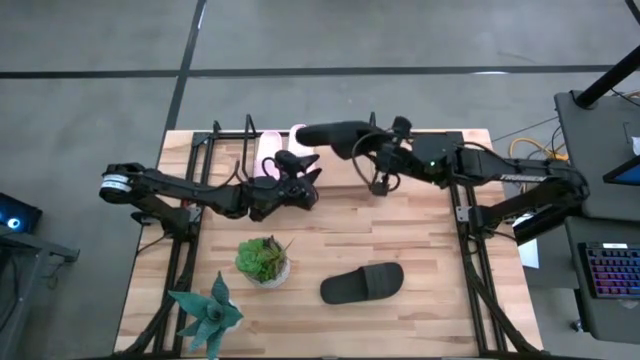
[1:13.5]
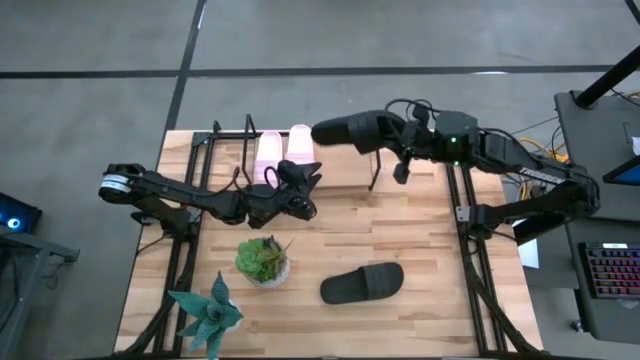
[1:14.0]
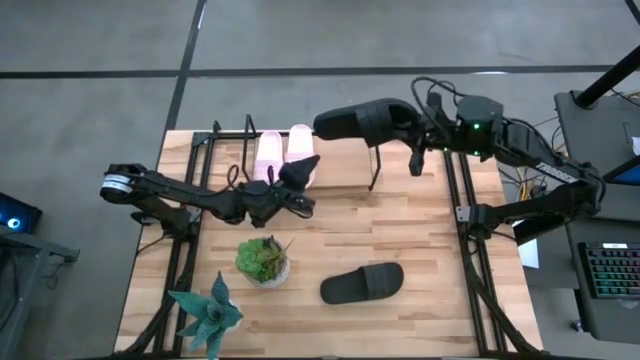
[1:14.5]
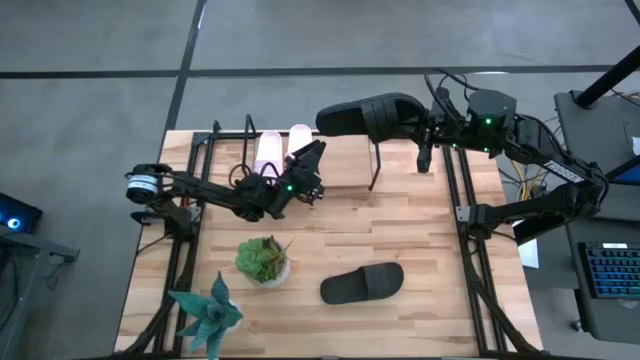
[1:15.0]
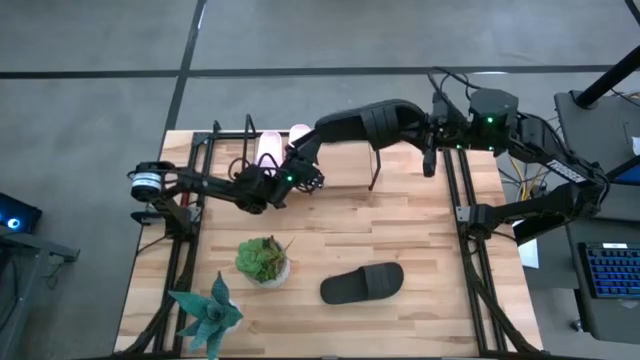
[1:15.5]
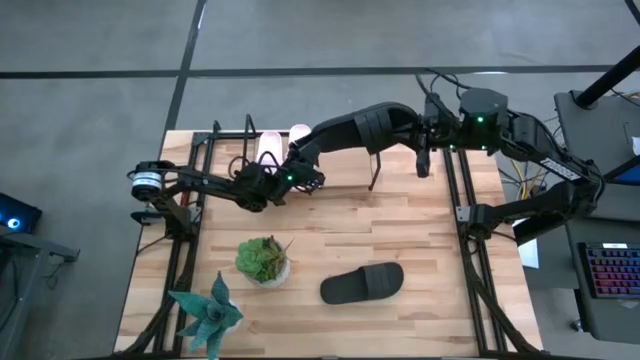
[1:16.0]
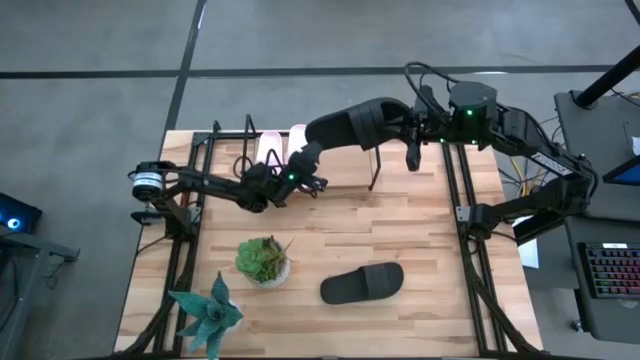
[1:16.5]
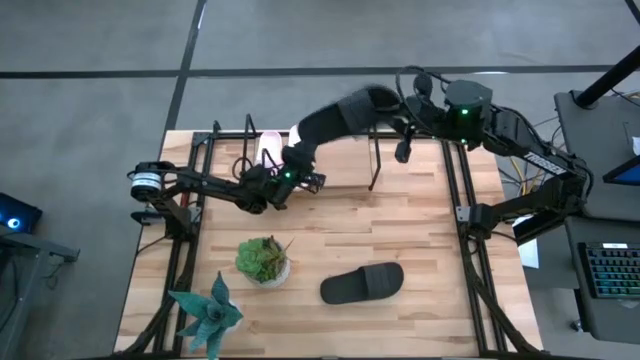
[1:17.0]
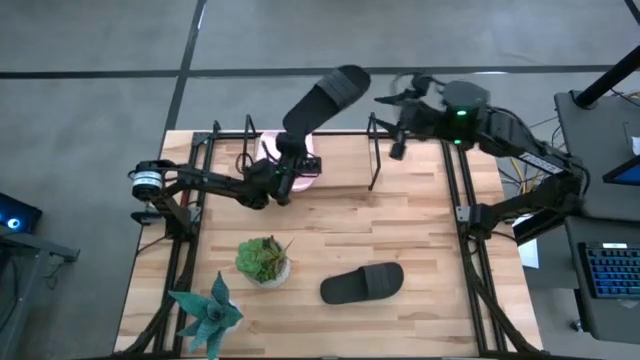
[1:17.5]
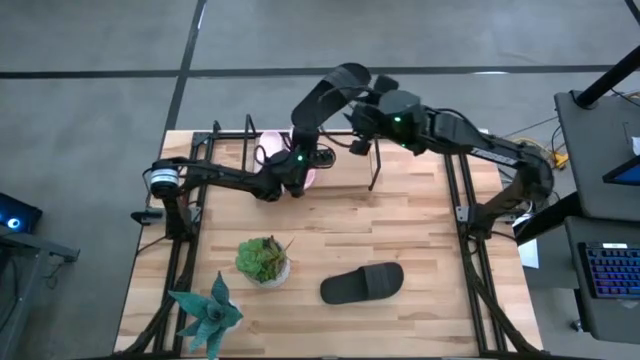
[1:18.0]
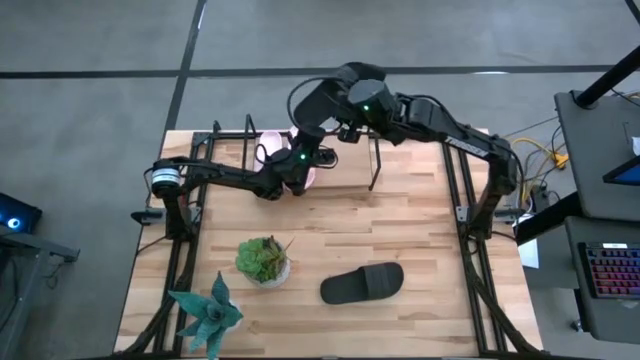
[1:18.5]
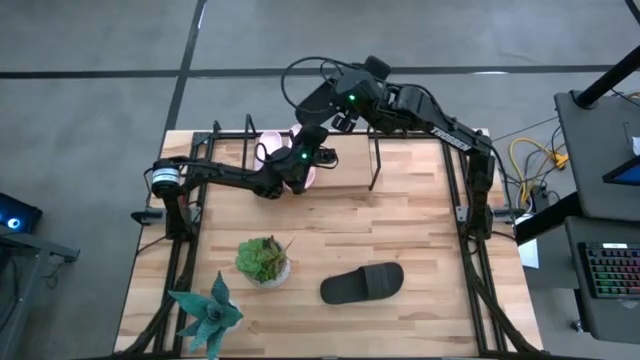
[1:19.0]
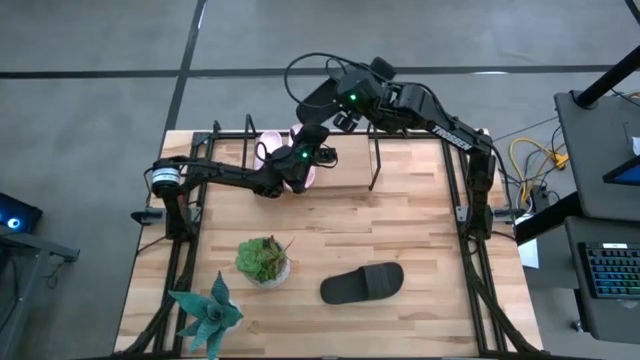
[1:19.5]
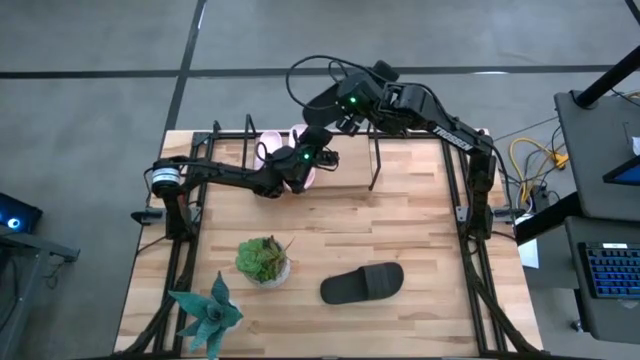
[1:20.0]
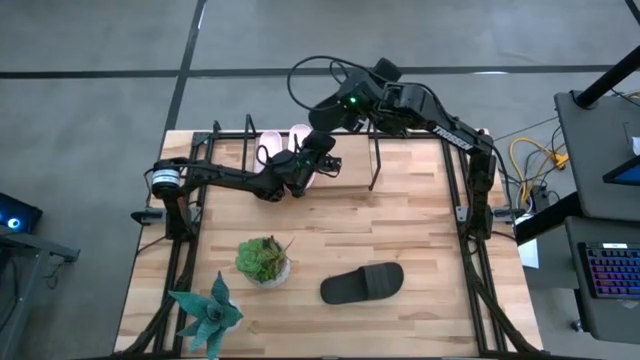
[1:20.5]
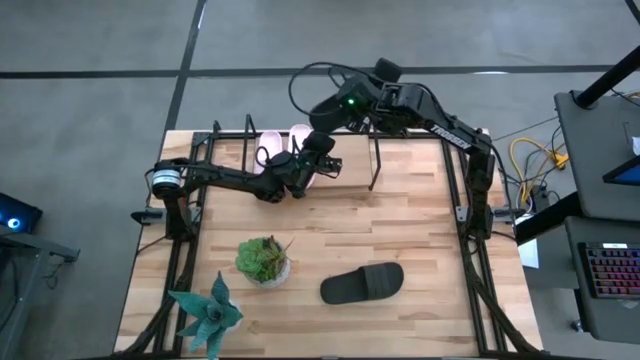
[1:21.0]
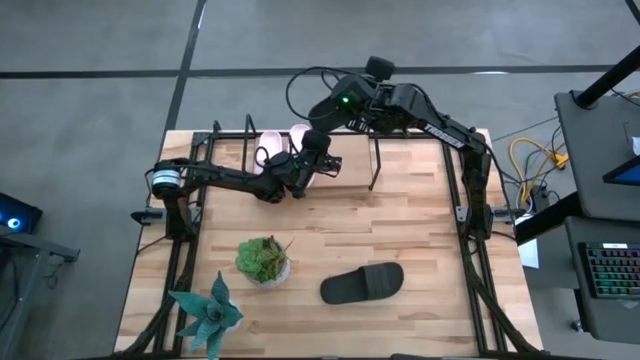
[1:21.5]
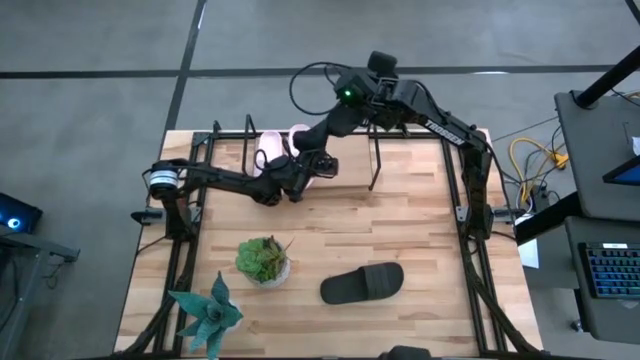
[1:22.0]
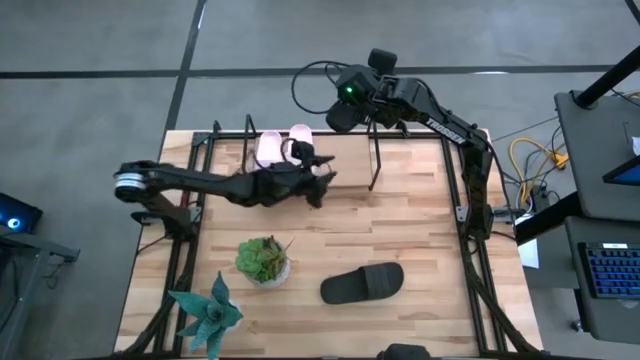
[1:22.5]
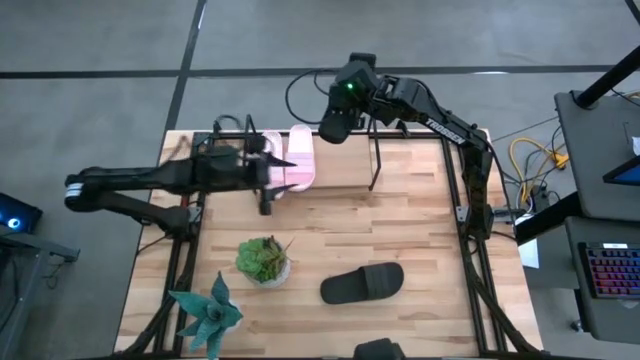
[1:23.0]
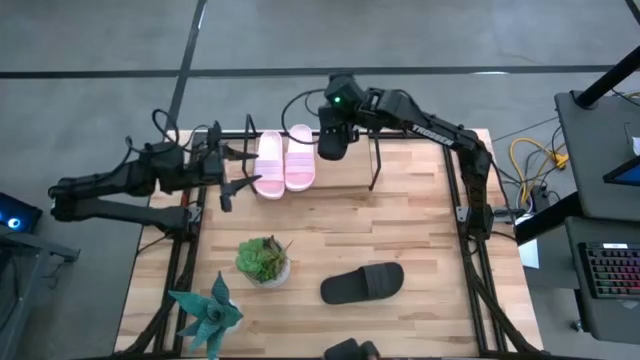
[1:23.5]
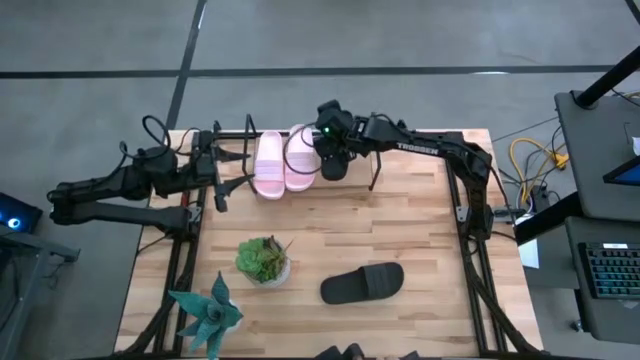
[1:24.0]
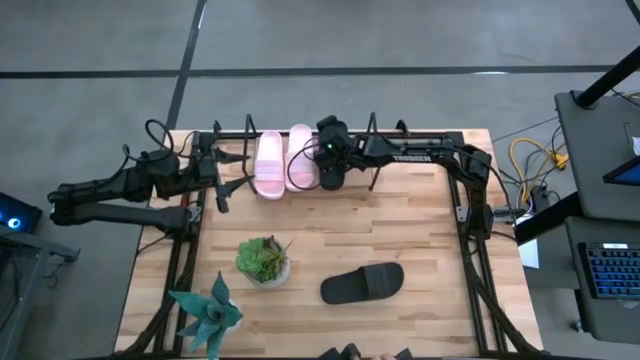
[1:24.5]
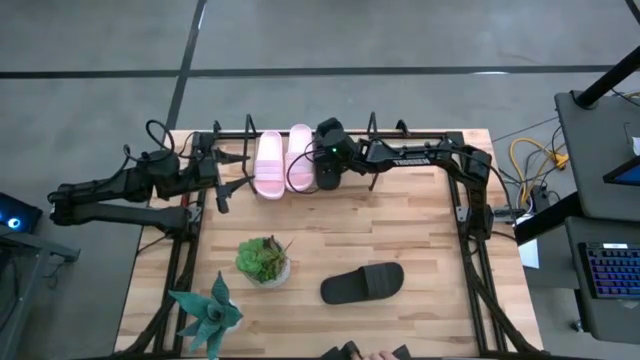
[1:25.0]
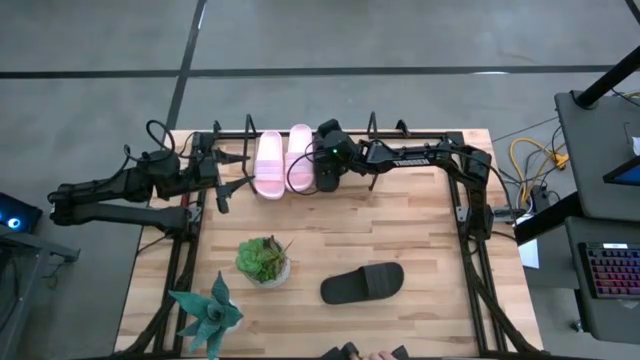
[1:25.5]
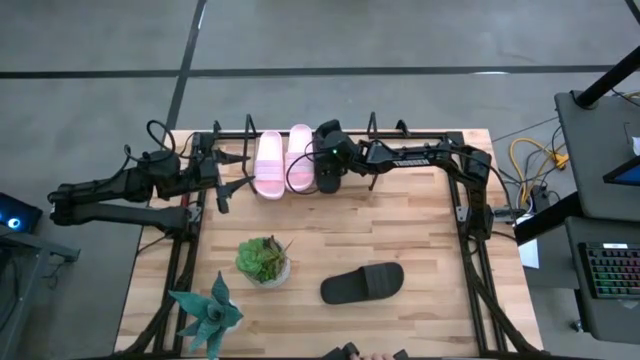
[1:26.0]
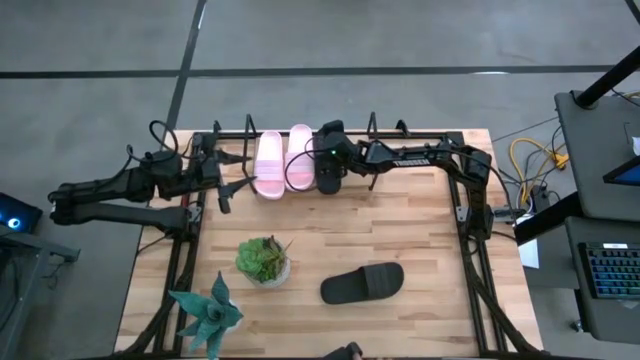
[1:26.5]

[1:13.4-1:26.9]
Task: Pick and place slides into the shelf
Put the top black slide on the shelf
